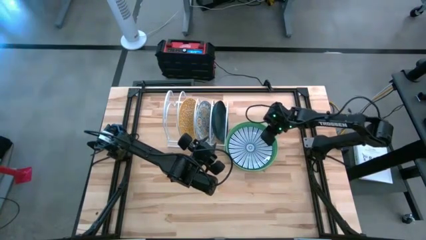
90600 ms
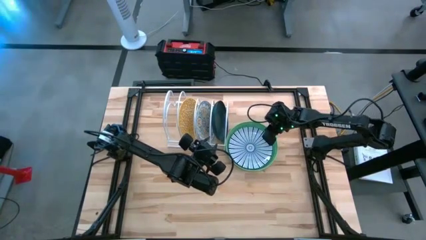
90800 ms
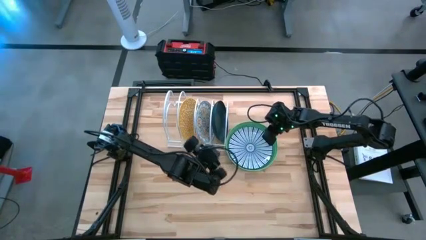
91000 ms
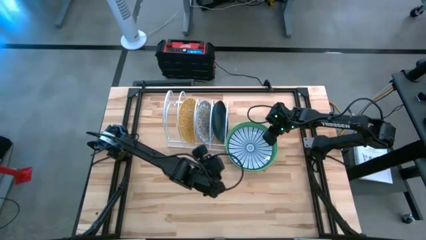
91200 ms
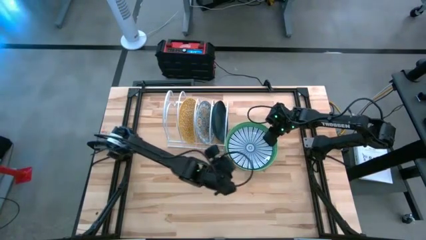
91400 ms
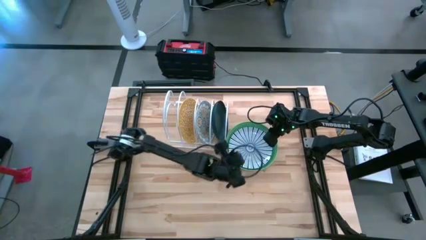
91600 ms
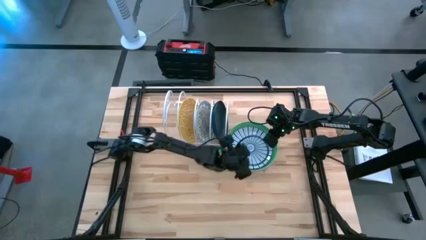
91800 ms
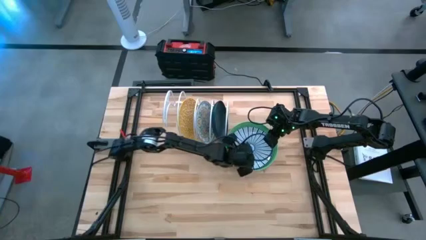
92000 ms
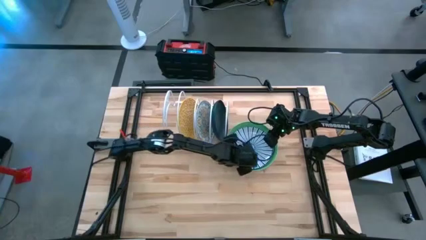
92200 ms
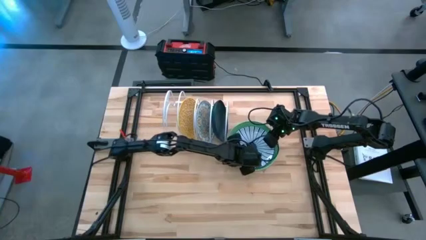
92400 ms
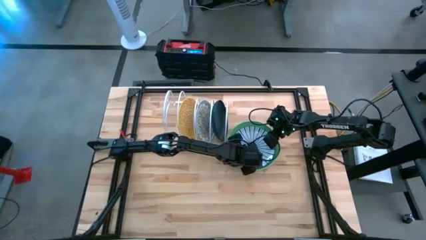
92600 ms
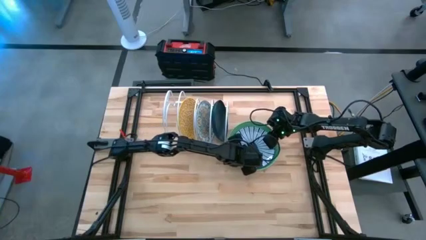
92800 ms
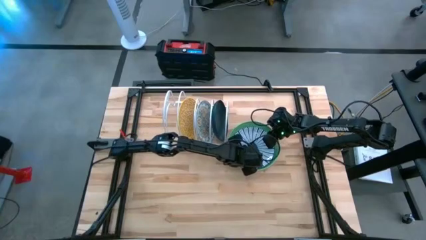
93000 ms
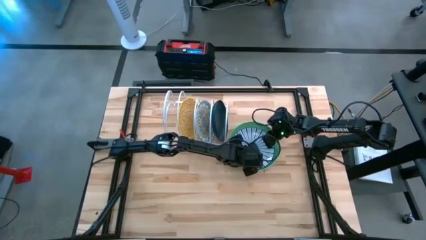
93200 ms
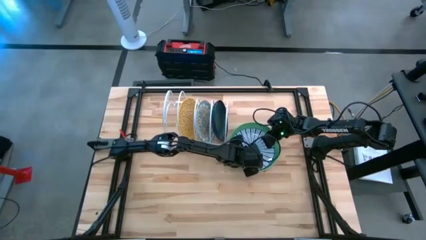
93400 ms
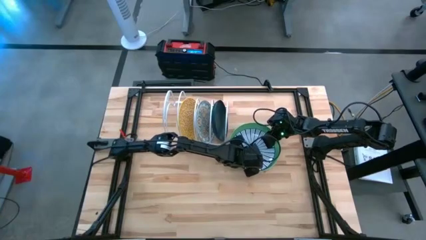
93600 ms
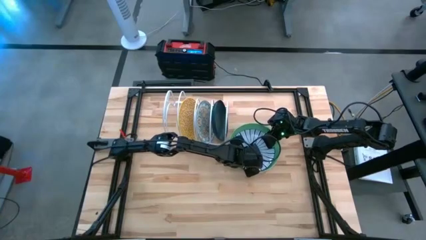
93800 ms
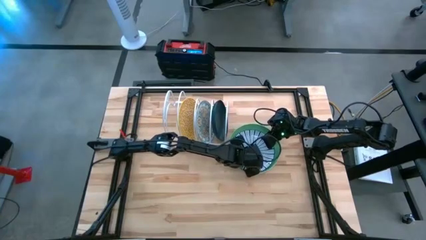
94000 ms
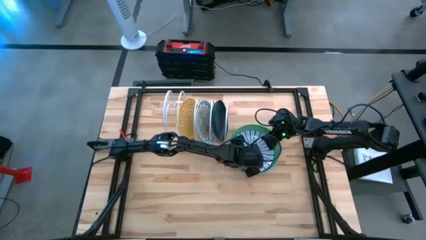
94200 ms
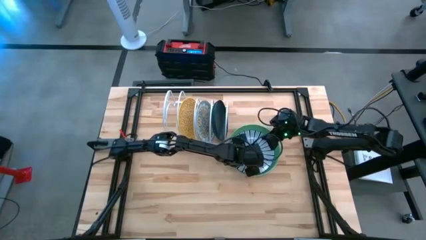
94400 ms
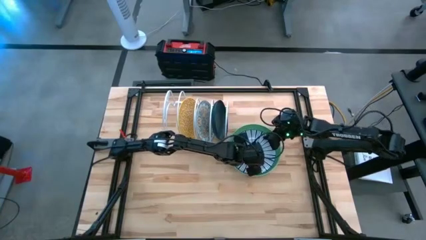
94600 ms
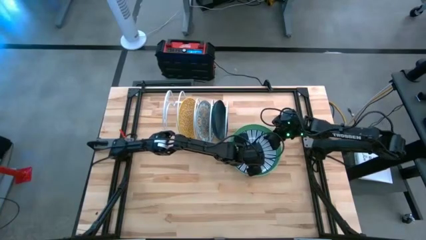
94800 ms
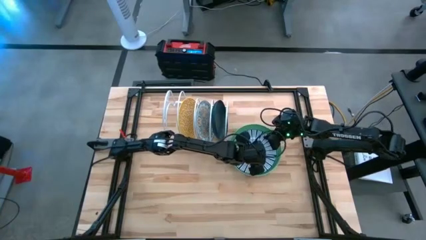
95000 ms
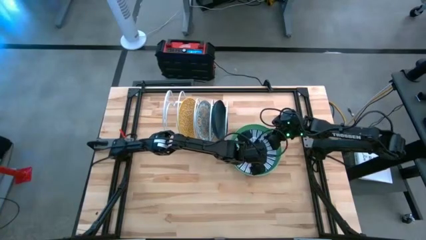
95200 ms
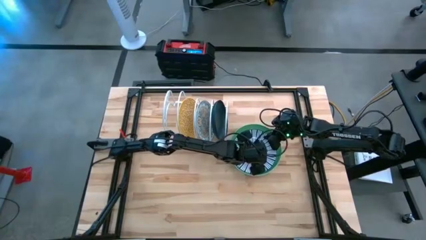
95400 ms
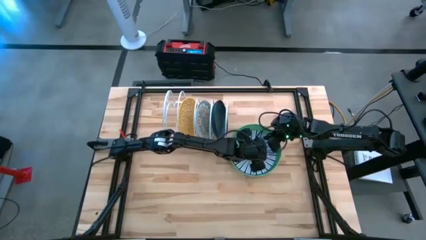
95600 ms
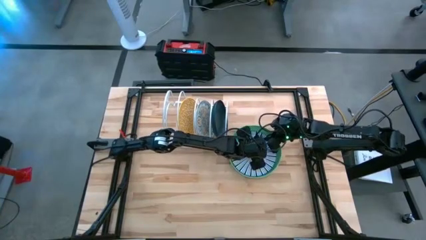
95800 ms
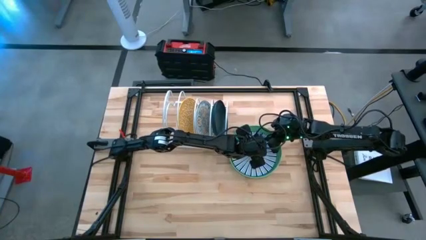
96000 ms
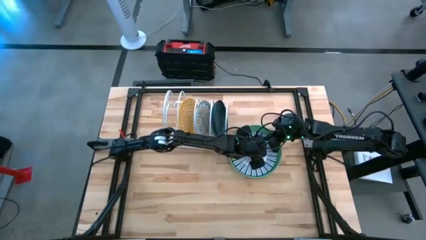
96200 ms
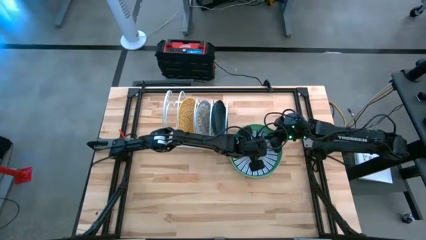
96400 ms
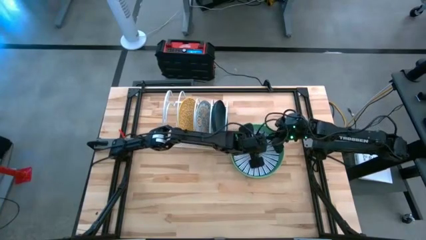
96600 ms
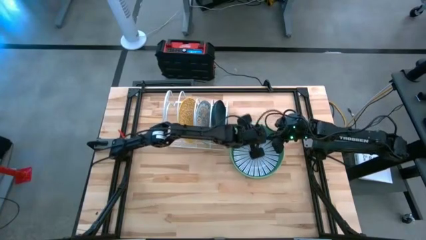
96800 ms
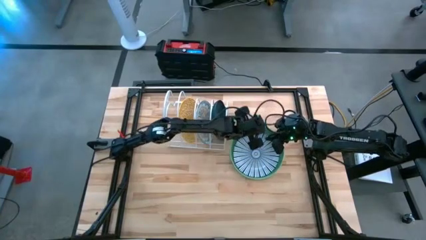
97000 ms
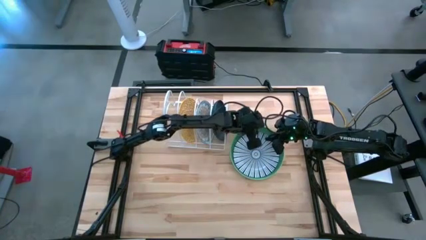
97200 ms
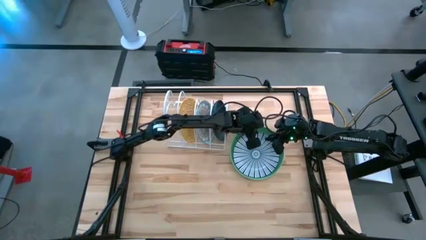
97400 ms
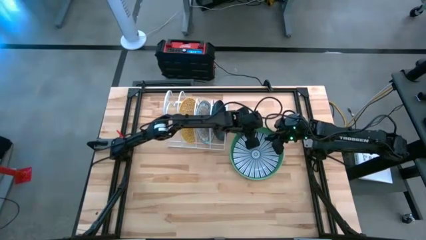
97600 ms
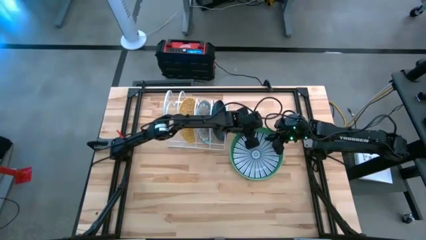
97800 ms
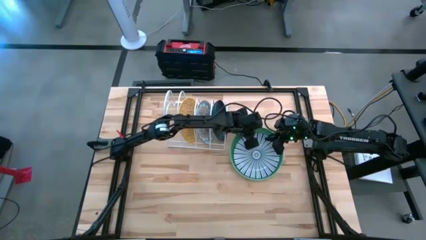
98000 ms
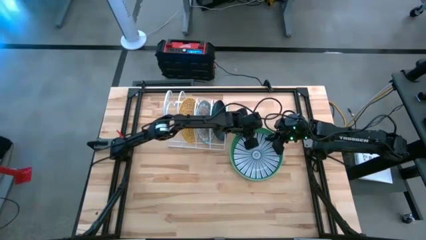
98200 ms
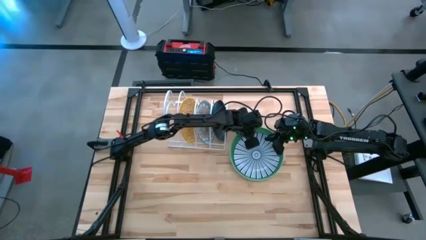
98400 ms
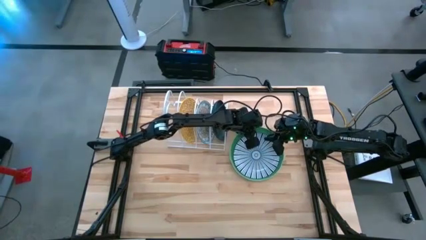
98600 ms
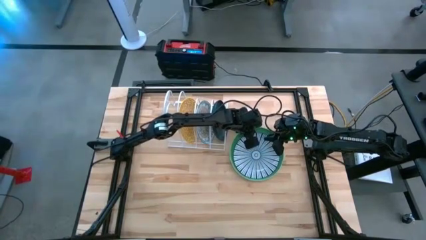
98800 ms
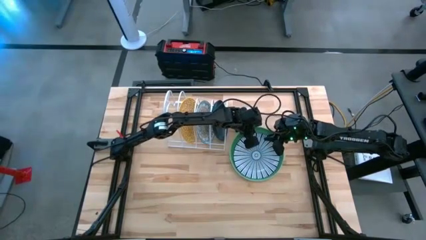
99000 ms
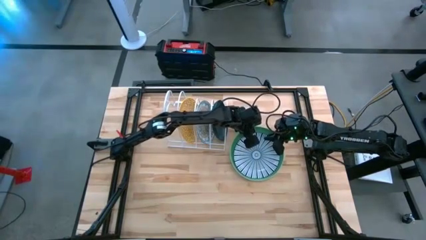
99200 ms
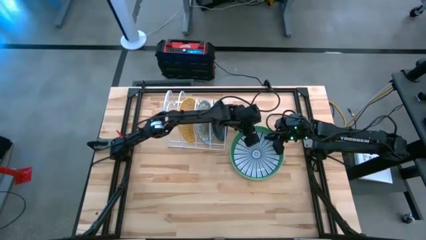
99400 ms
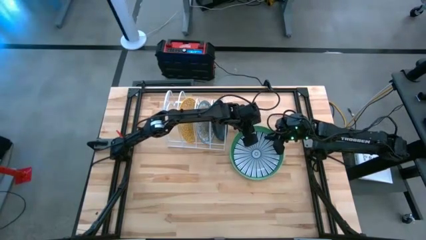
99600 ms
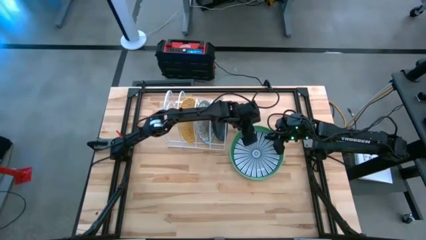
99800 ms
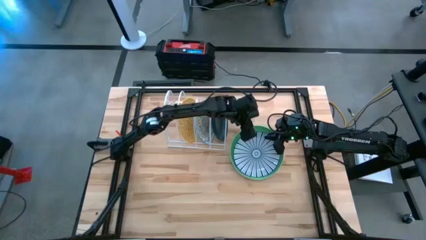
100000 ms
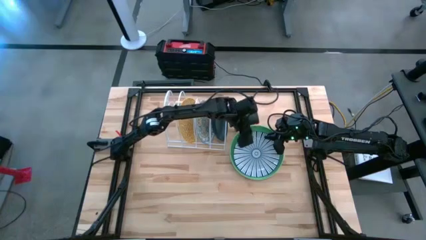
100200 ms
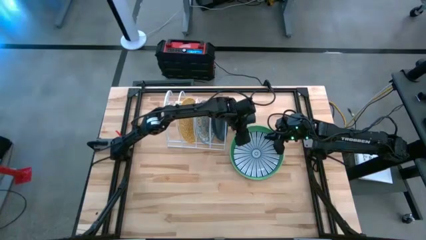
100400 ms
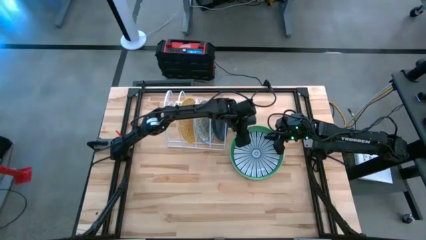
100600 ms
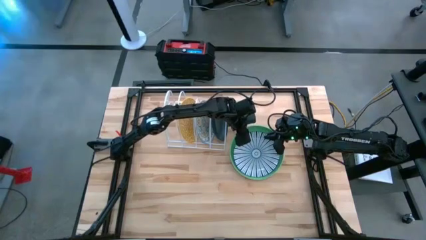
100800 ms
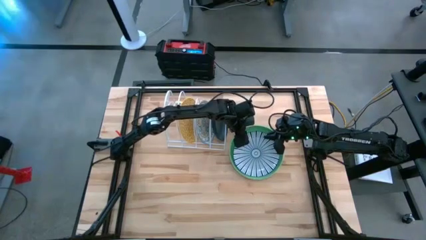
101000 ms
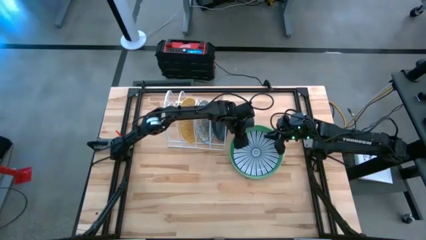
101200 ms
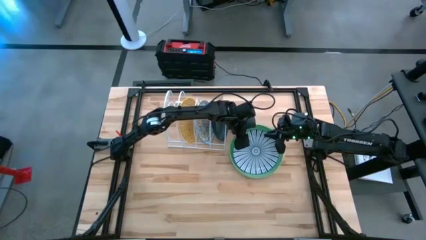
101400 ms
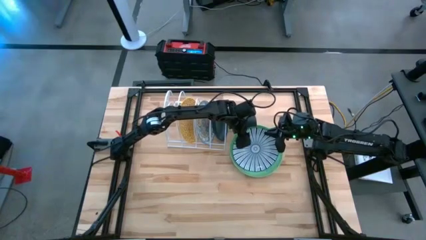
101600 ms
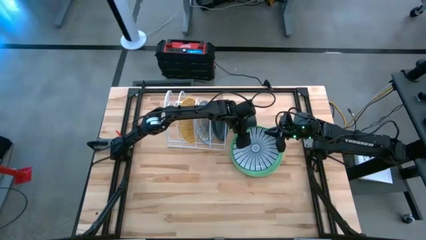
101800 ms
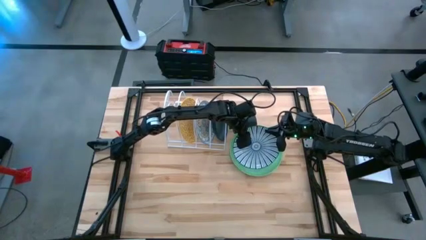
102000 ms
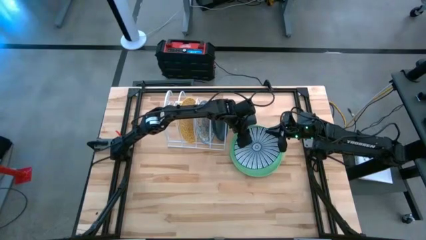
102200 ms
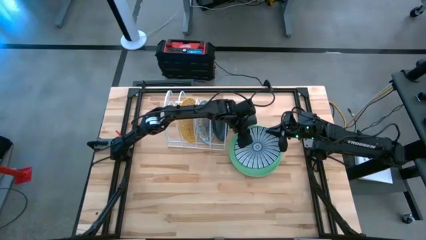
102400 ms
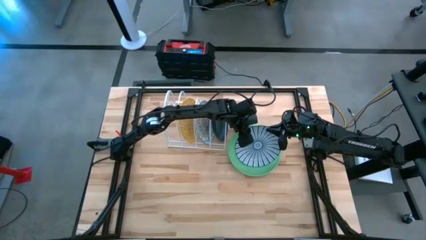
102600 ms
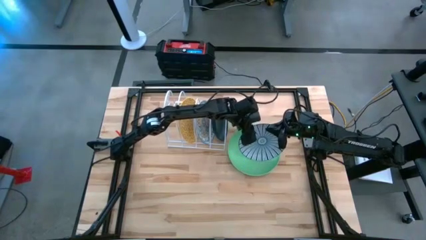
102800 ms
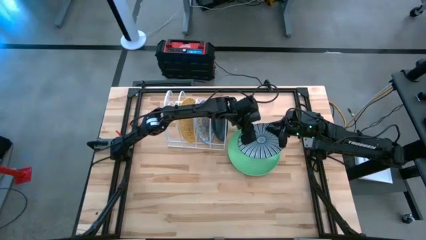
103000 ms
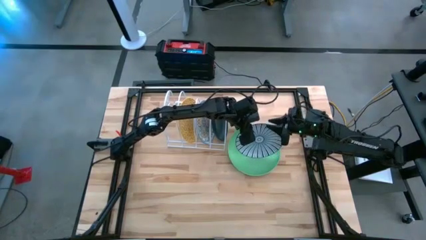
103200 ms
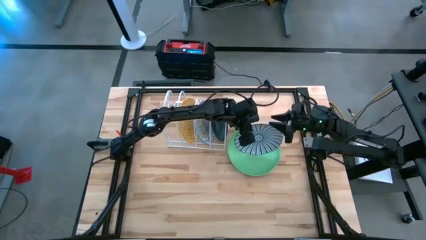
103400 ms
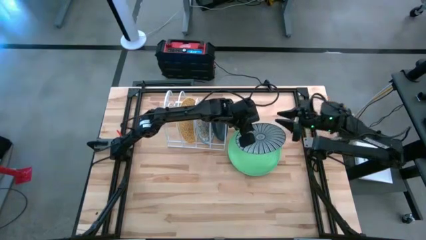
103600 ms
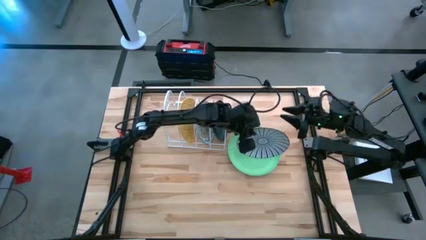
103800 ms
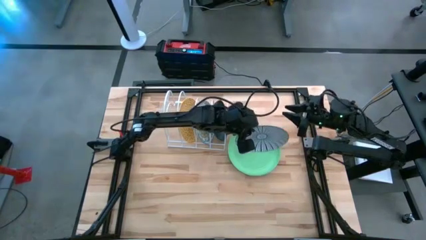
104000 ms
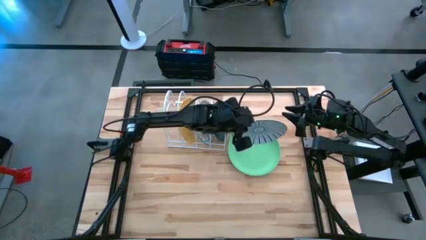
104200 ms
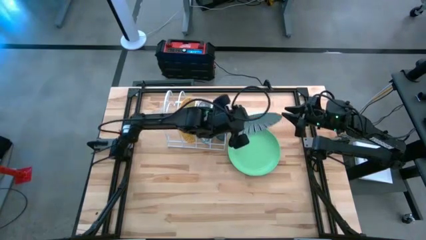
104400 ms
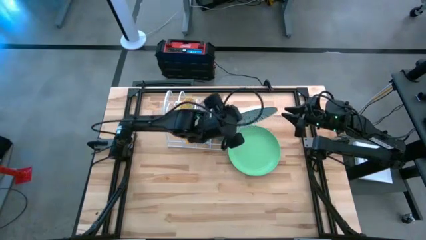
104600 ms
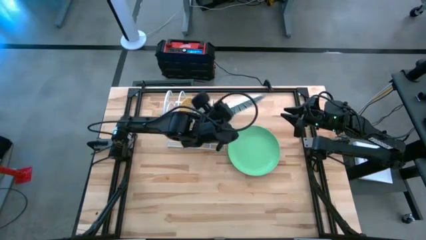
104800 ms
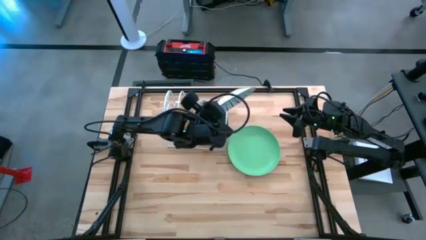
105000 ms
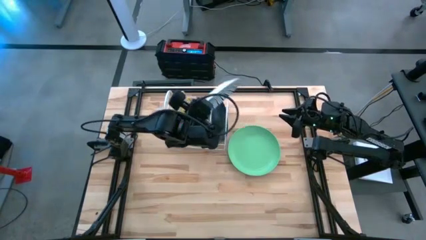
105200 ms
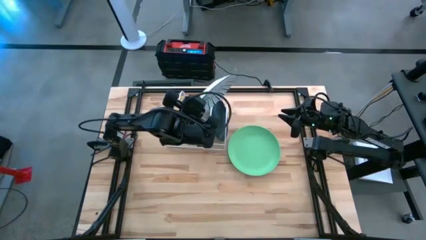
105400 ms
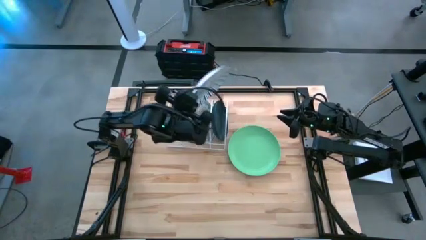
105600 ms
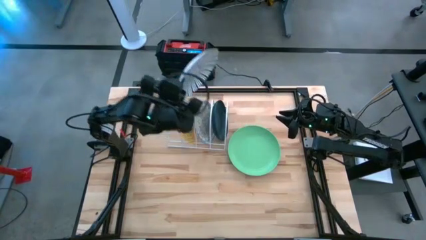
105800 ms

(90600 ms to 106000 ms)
Task: Sort dishes
Put the blue plate in the dish rack
